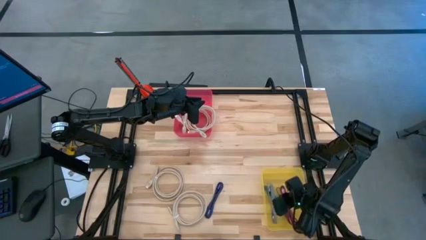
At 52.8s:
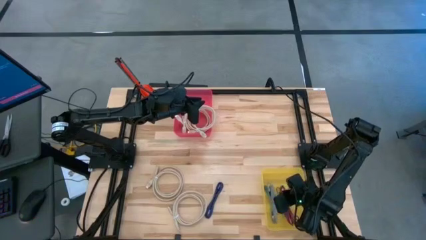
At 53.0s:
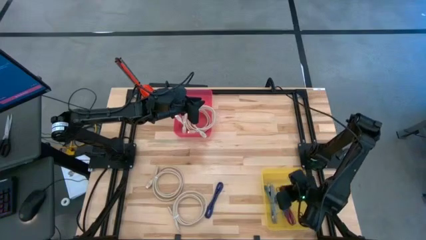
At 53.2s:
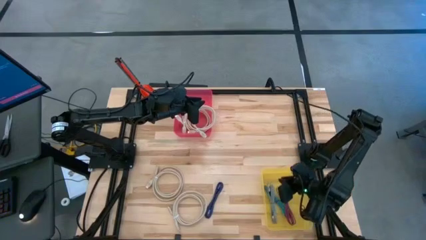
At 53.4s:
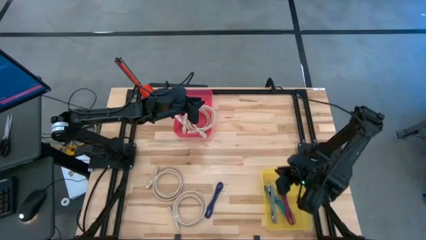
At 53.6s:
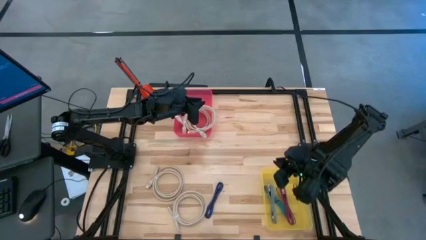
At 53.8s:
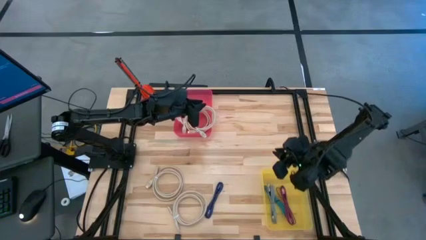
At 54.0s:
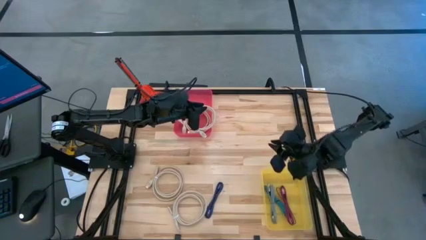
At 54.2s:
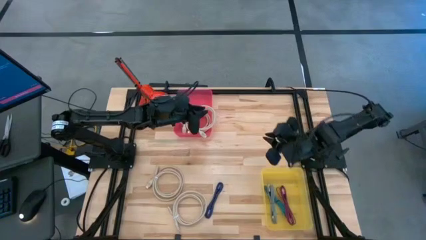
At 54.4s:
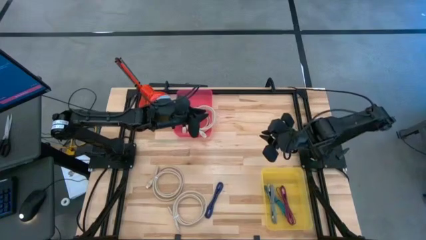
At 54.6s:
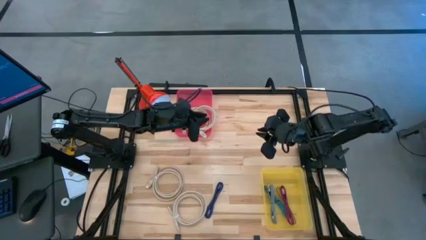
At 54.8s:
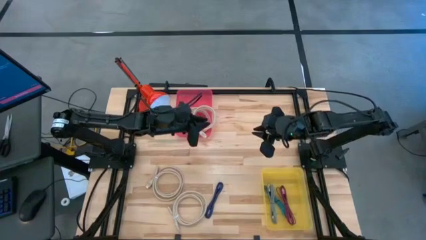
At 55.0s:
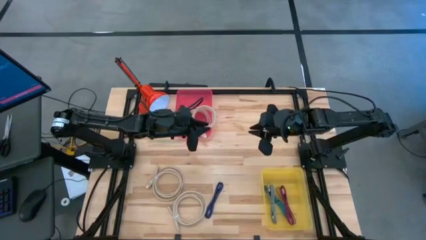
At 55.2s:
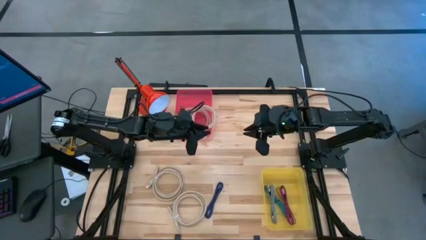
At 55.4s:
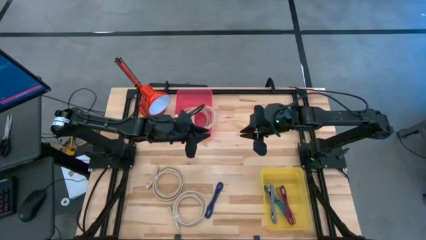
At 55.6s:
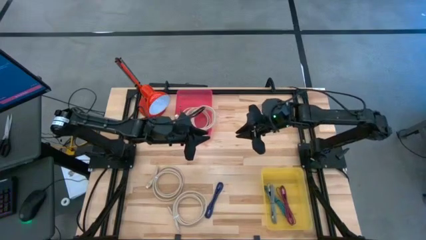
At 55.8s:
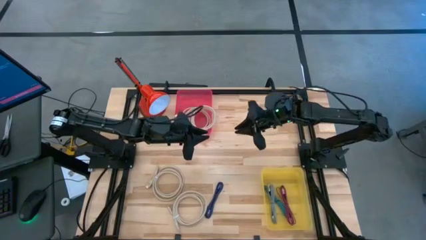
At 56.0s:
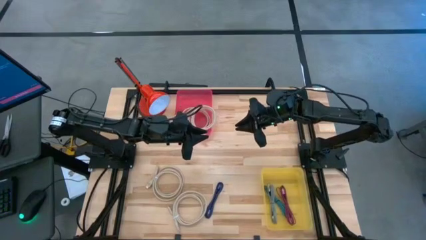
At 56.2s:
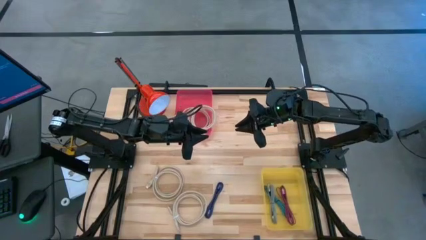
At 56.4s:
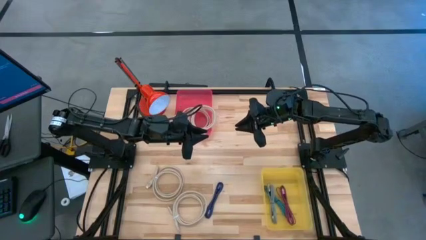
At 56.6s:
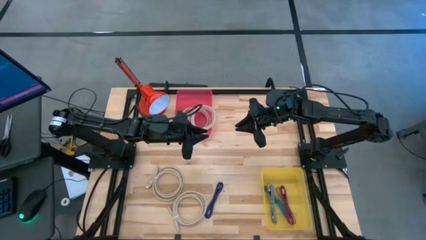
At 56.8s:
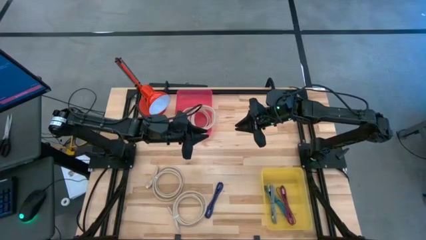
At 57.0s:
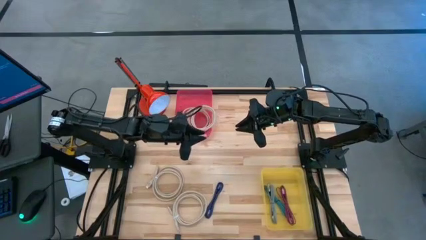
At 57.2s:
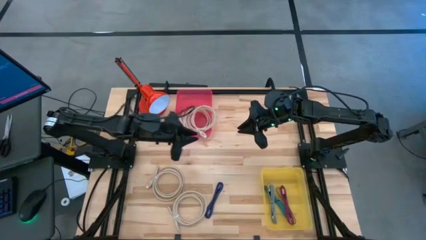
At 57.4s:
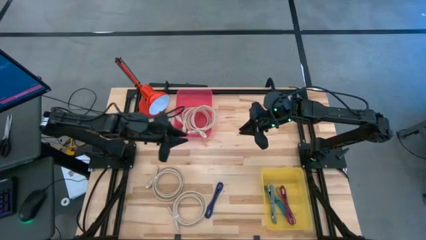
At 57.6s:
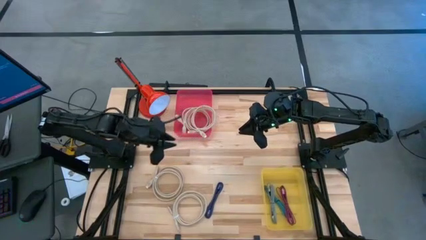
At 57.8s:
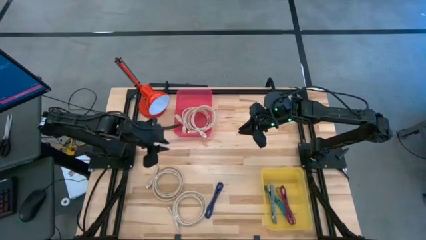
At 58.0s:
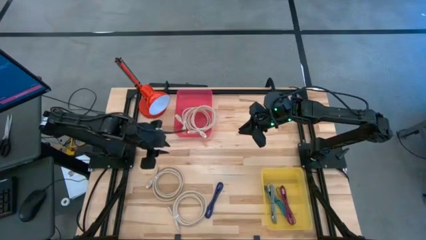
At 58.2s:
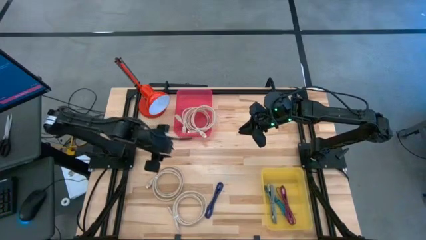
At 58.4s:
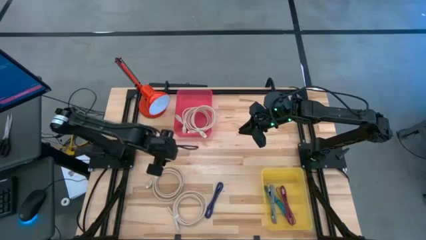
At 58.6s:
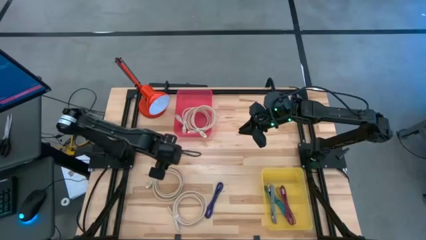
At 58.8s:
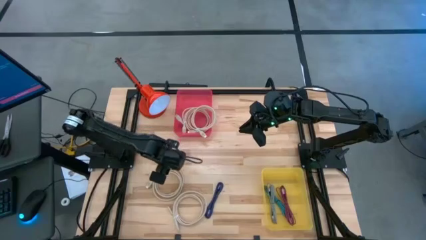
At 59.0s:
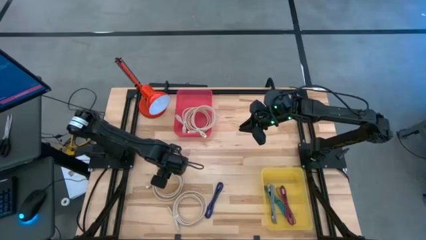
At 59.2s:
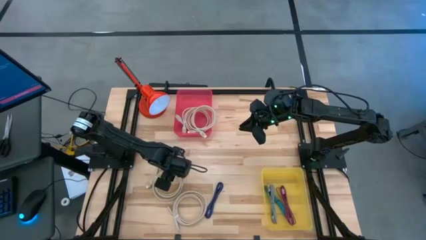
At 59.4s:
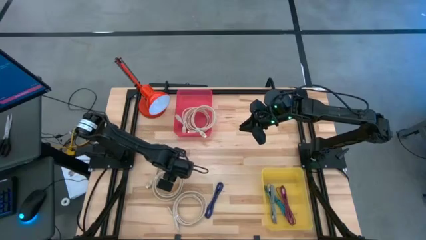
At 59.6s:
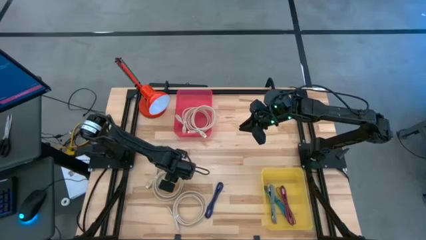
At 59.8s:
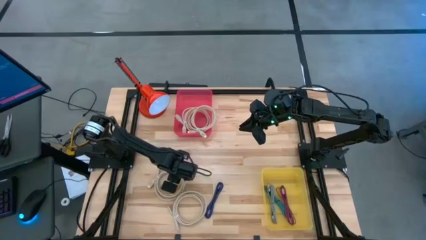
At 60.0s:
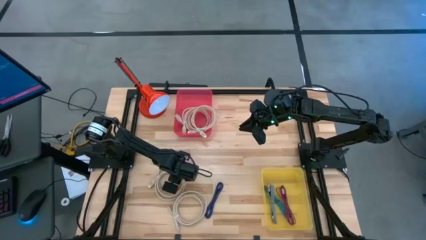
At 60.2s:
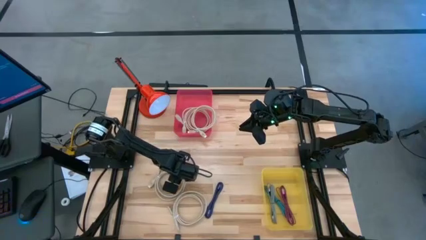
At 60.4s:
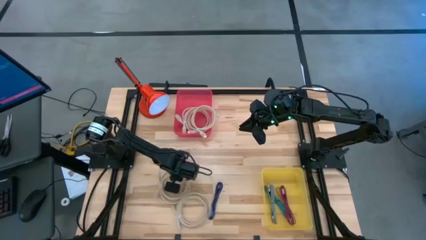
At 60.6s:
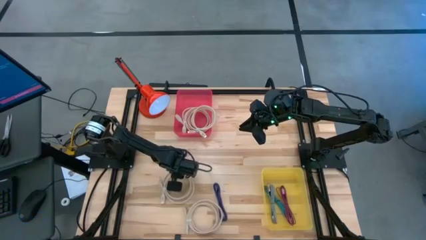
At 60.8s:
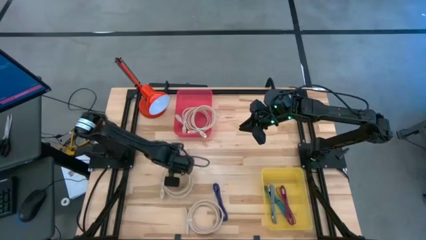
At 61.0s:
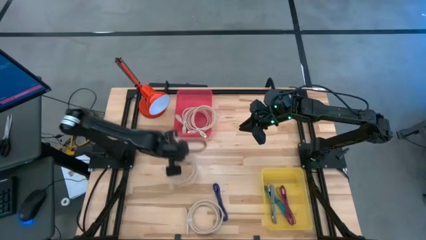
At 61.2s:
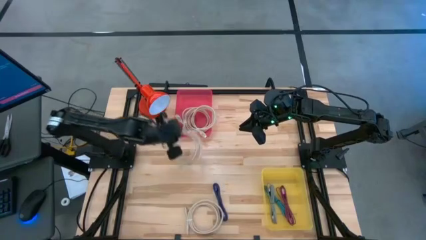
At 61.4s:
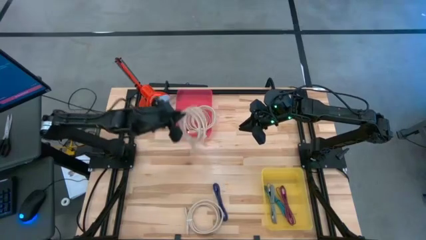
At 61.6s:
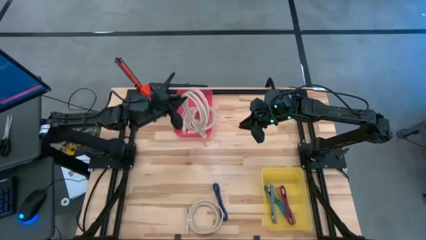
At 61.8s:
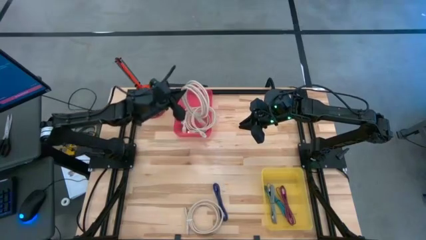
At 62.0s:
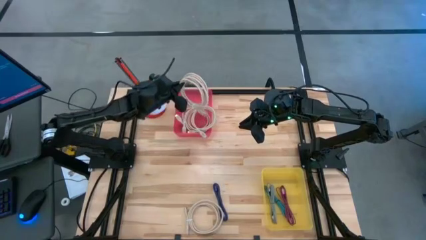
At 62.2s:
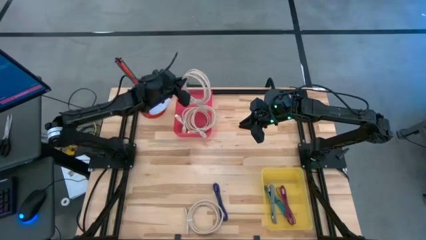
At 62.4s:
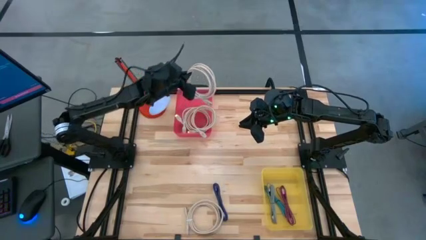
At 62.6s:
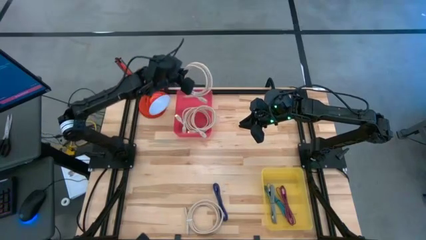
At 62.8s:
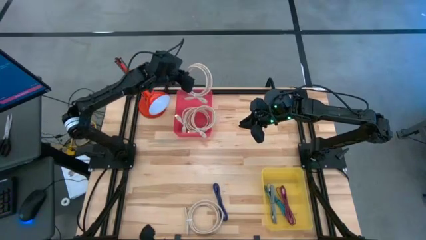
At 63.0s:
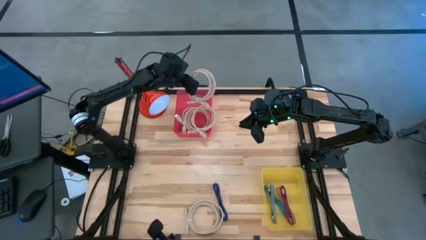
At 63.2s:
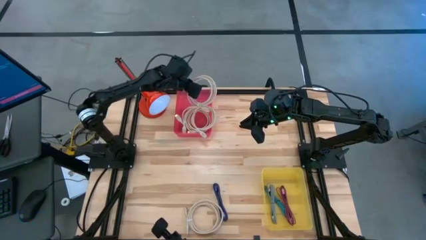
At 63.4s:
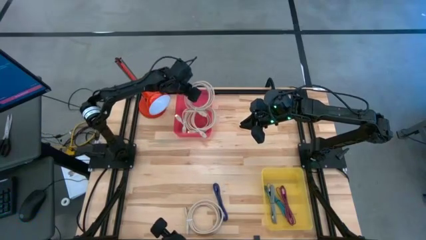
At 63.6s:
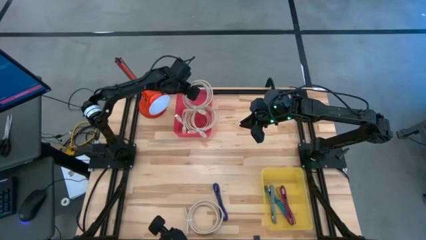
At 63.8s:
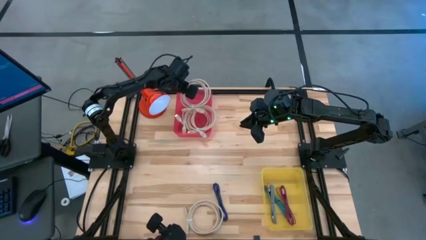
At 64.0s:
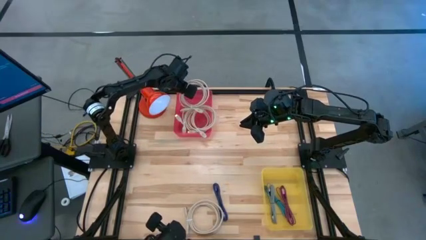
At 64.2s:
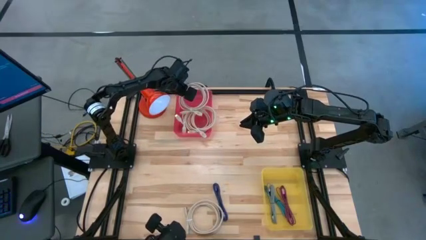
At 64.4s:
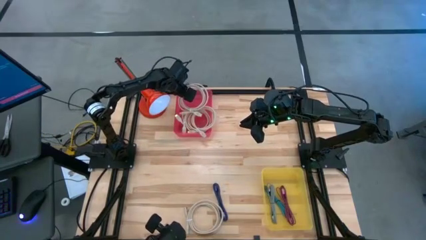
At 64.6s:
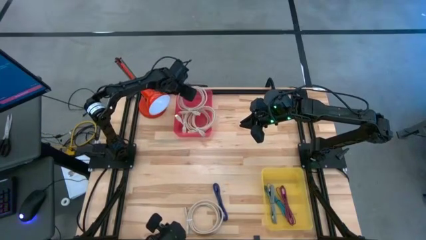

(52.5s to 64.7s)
Task: Pick & Place USB Port
Put the HDMI cable into the red bin
